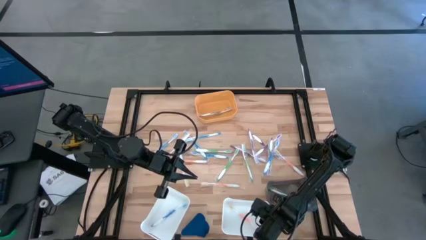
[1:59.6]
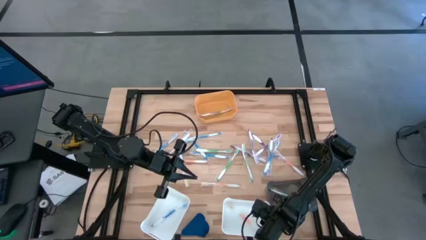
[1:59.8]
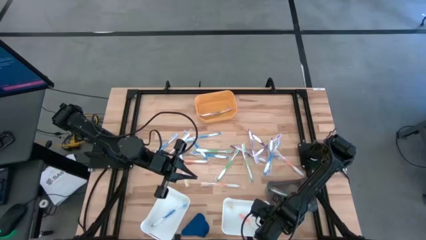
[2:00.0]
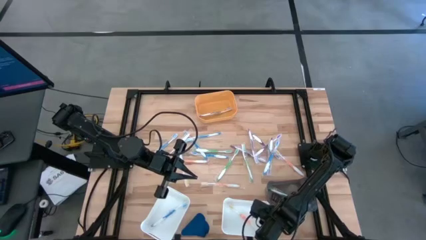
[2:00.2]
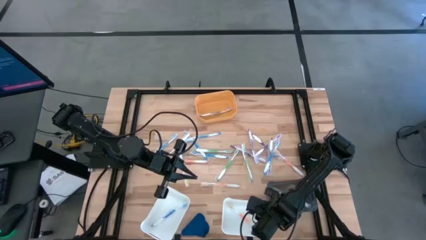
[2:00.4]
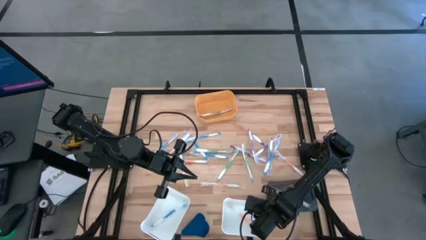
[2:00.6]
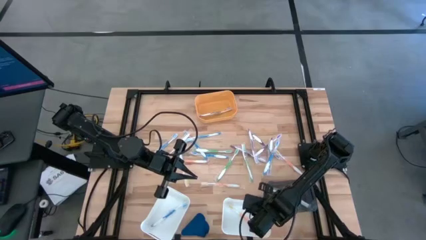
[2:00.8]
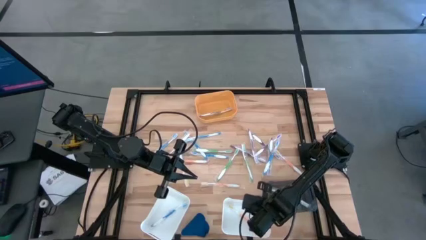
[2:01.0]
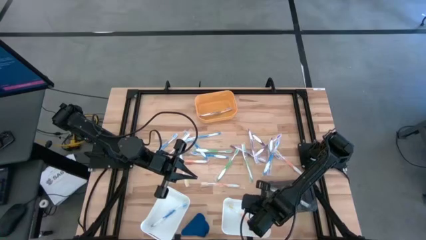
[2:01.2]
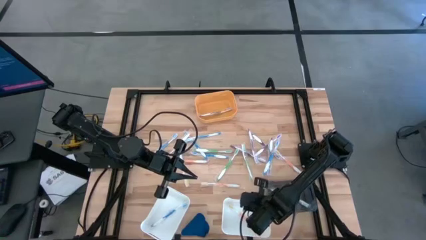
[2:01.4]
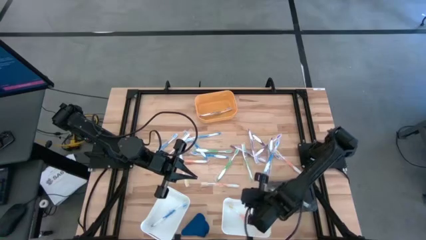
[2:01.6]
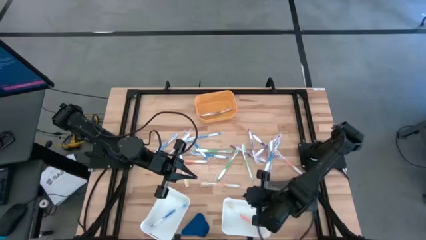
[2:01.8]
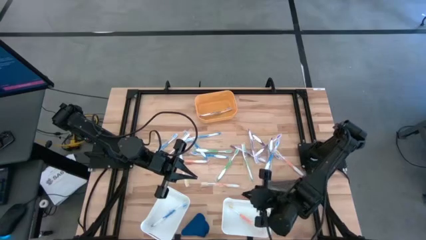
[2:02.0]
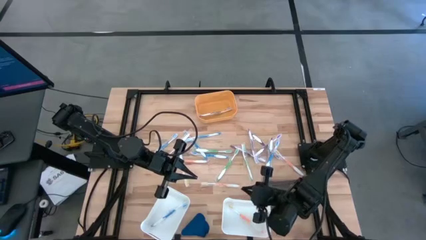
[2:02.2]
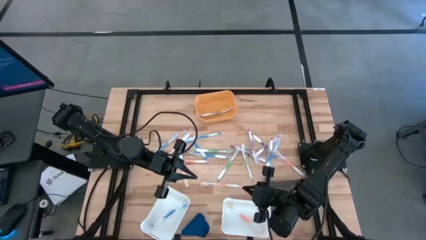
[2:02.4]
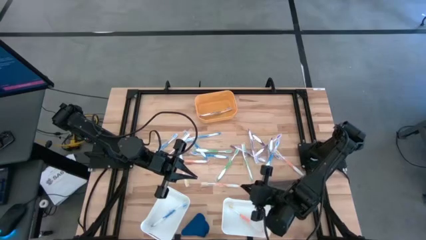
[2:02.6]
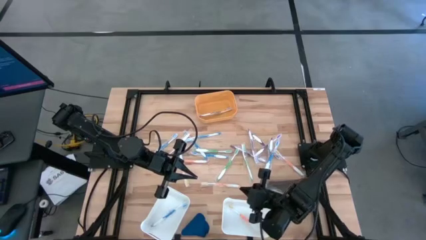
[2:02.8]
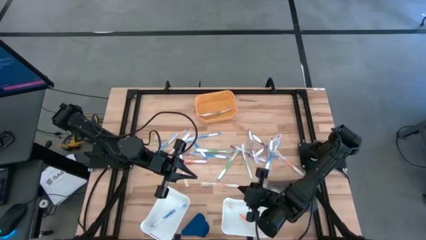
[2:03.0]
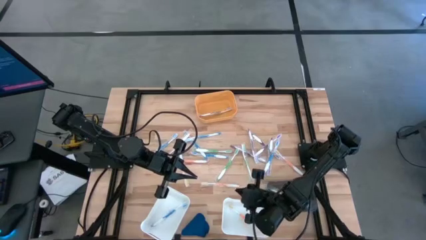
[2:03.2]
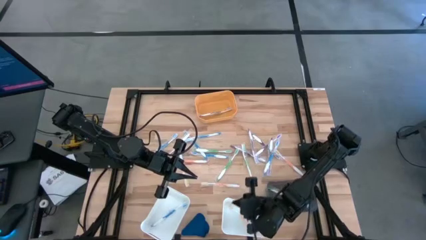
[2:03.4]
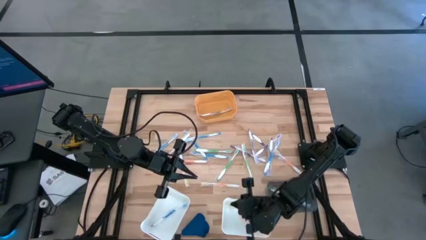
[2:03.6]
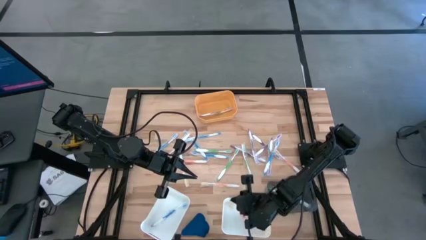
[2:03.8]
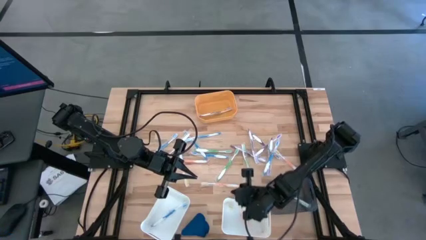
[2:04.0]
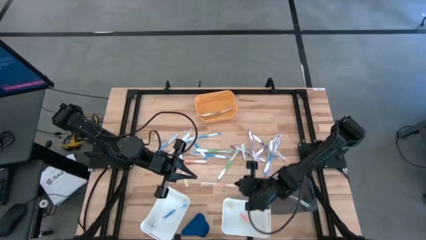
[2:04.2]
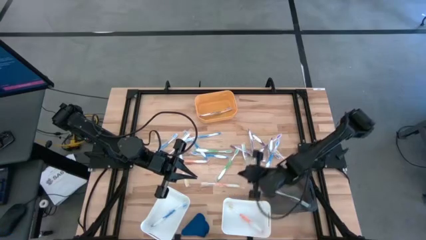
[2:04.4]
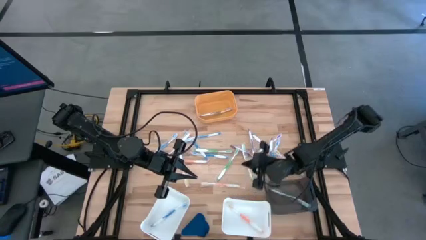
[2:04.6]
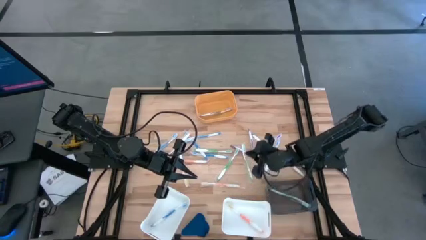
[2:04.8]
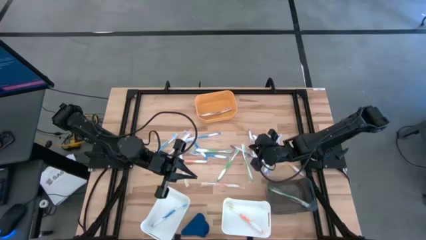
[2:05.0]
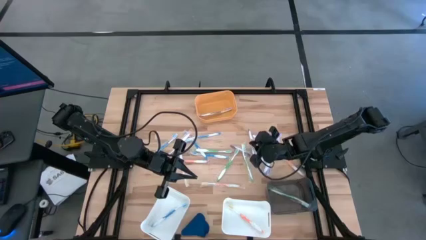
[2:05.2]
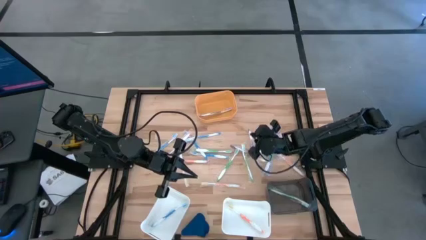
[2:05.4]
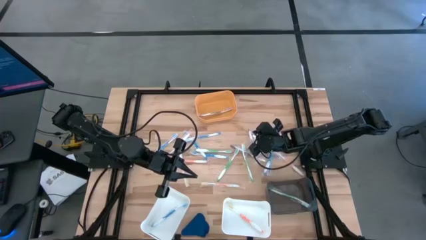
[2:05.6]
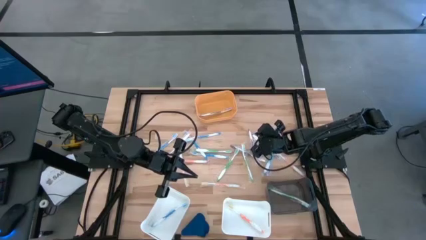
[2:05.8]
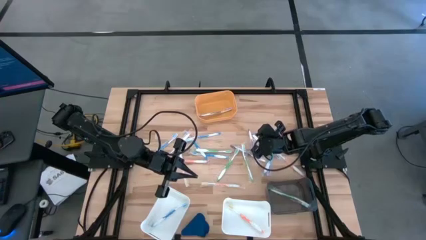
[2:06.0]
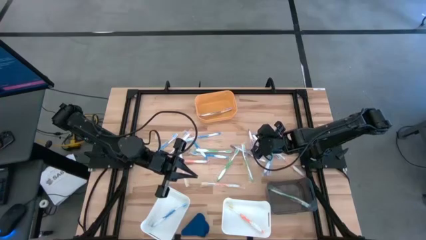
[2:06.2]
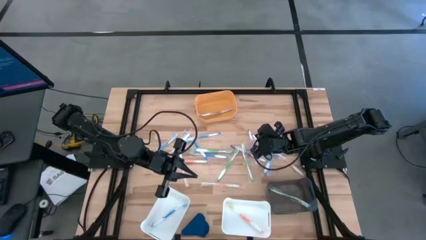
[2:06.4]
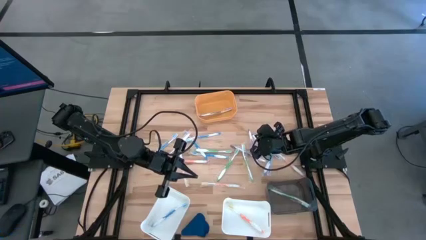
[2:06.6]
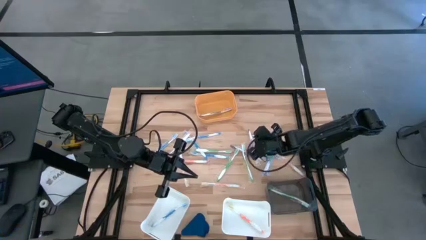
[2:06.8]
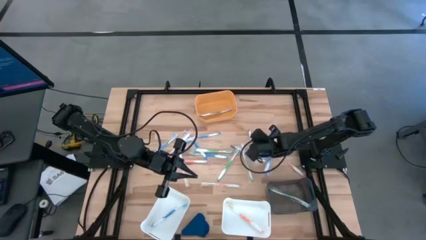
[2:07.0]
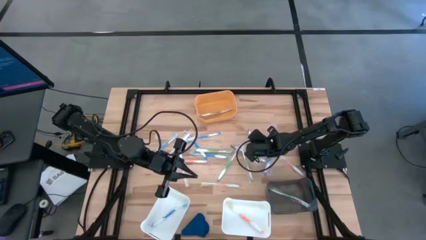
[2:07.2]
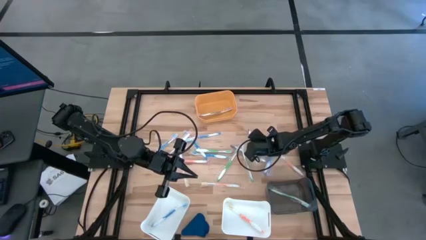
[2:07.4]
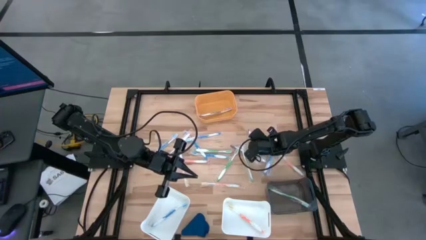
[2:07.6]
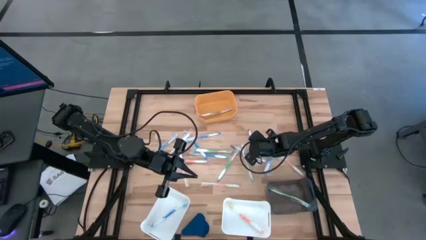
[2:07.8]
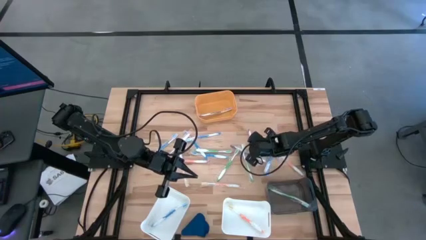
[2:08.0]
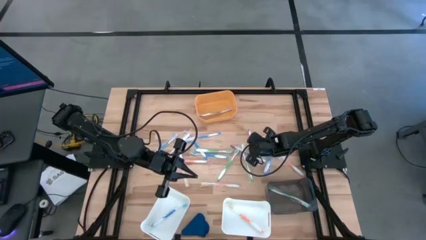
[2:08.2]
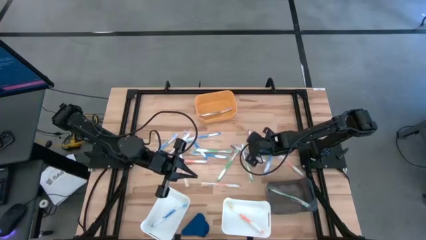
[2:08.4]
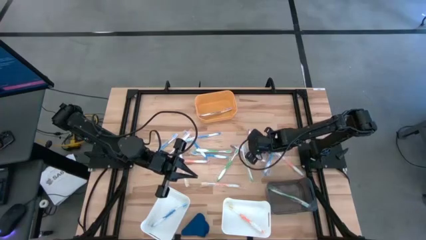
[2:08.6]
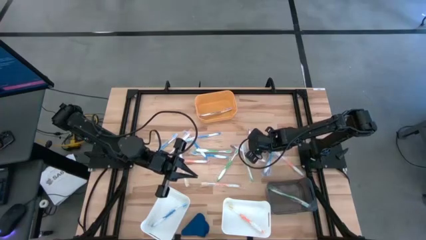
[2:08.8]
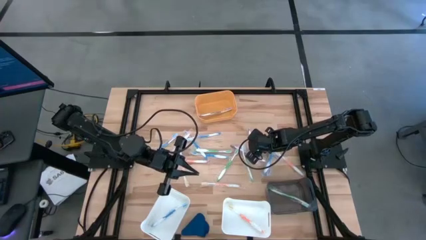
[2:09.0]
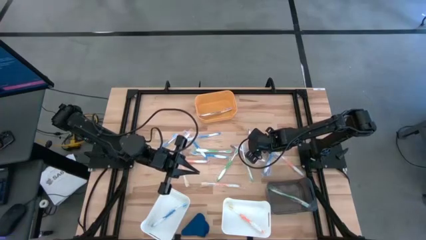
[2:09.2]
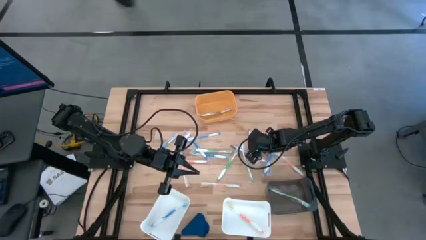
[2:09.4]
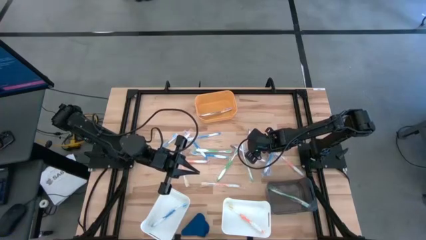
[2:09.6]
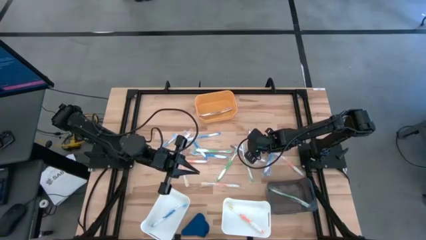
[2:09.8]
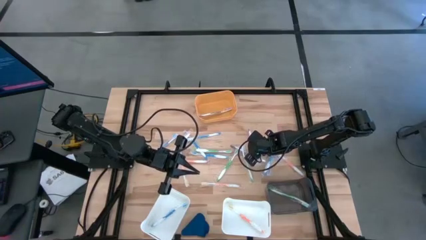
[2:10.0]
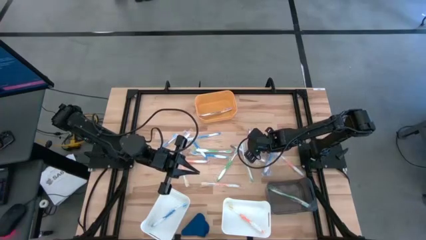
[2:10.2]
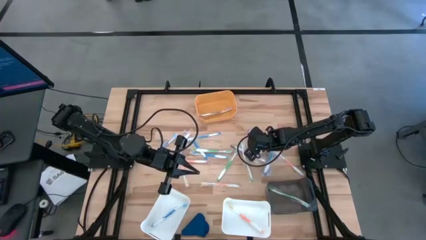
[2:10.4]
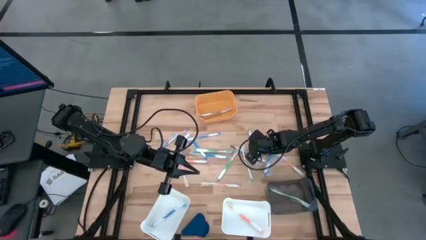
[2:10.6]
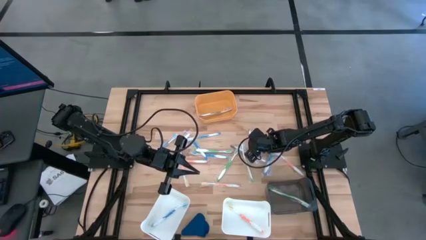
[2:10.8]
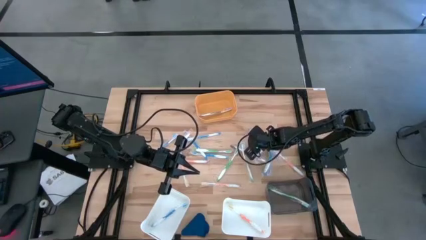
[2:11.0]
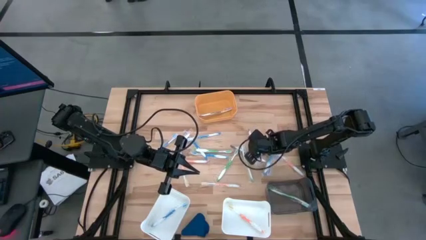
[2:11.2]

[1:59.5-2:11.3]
Task: Pick & Place Toothbrushes
Put the purple toothbrush into the yellow bin

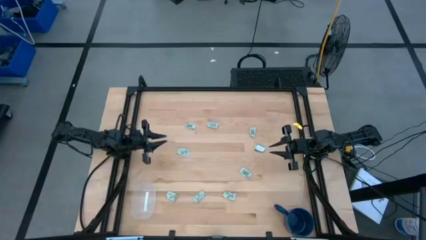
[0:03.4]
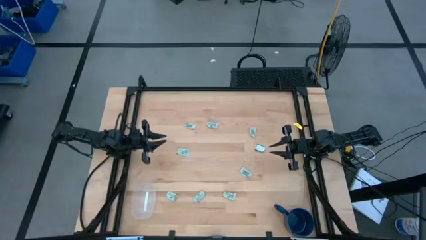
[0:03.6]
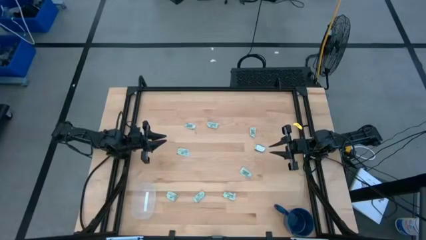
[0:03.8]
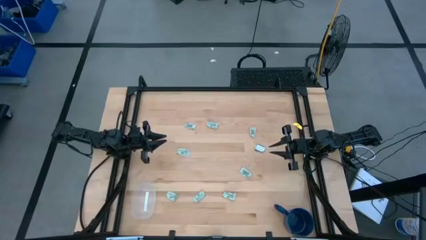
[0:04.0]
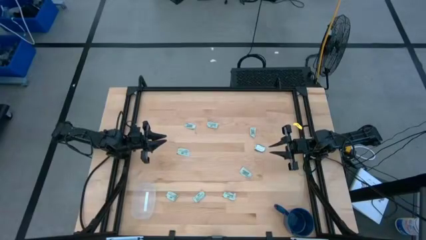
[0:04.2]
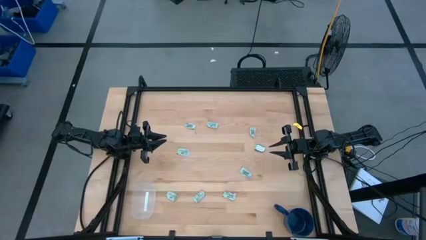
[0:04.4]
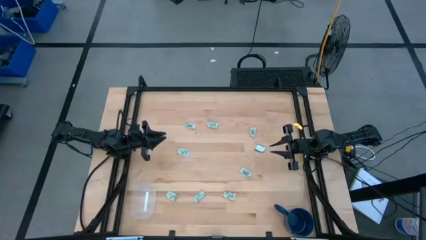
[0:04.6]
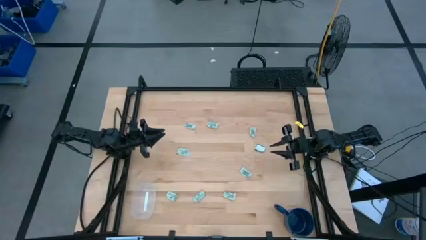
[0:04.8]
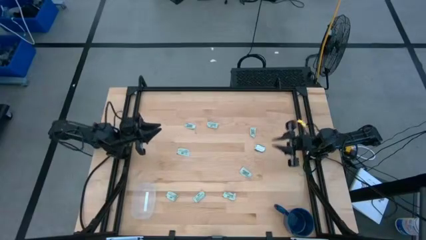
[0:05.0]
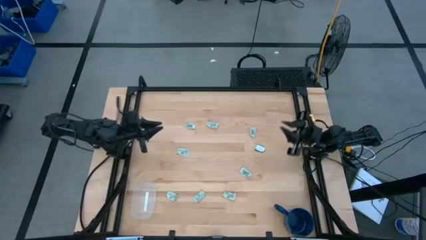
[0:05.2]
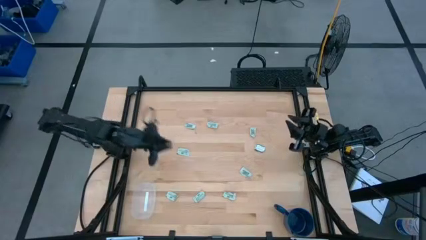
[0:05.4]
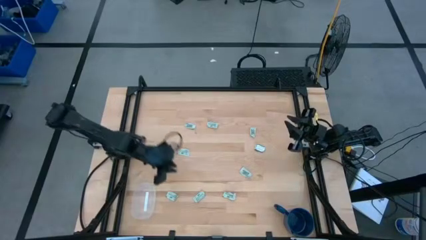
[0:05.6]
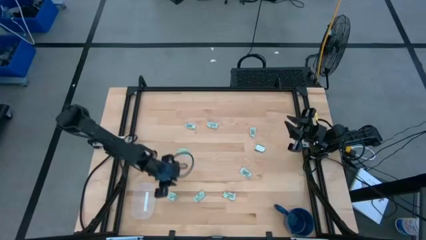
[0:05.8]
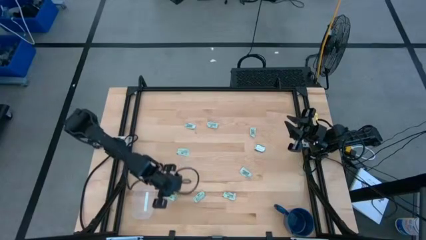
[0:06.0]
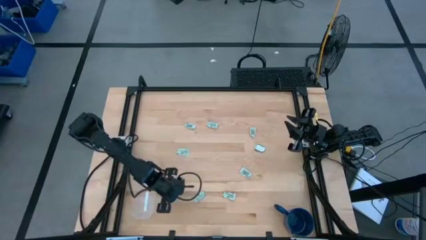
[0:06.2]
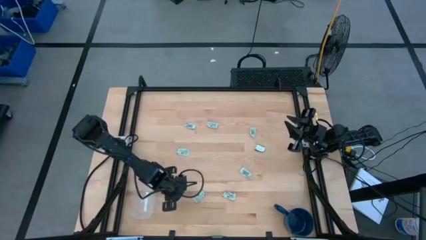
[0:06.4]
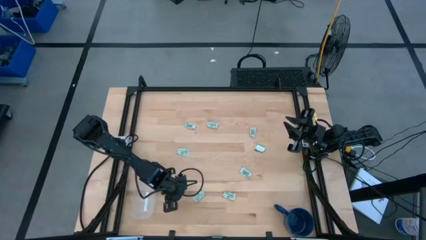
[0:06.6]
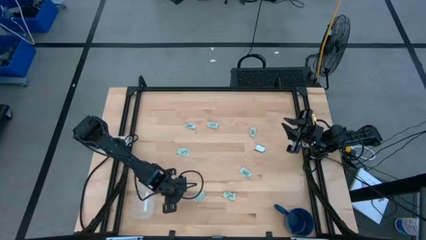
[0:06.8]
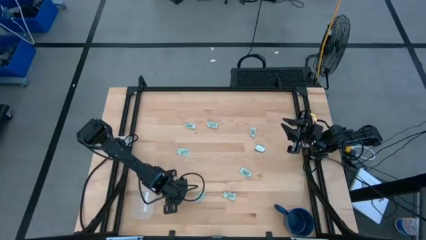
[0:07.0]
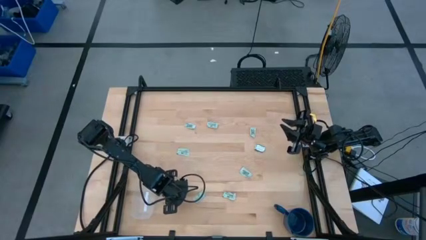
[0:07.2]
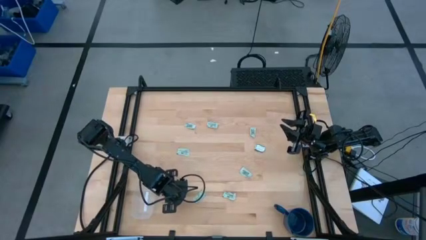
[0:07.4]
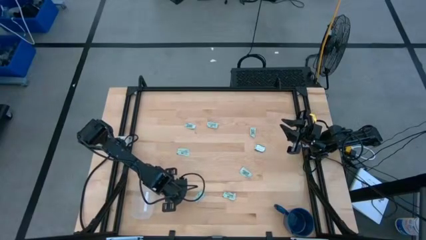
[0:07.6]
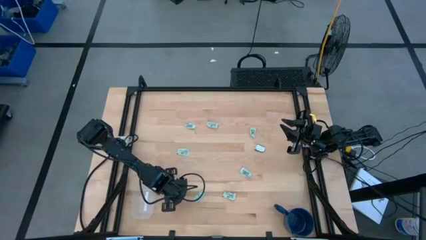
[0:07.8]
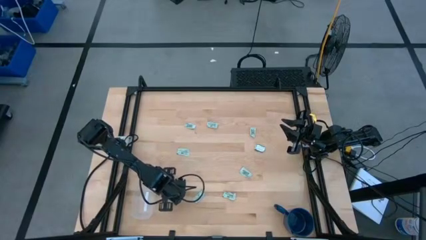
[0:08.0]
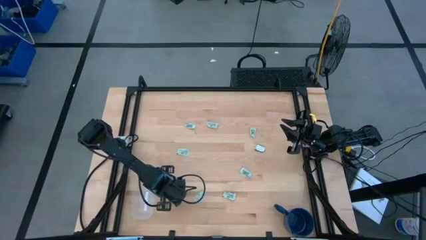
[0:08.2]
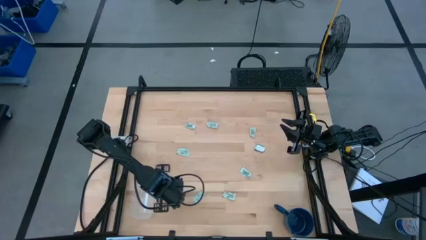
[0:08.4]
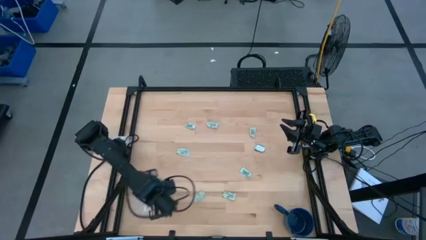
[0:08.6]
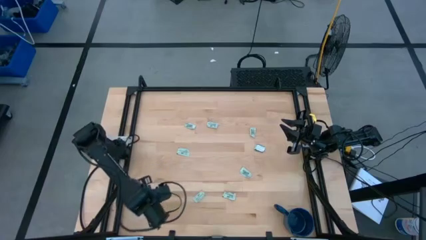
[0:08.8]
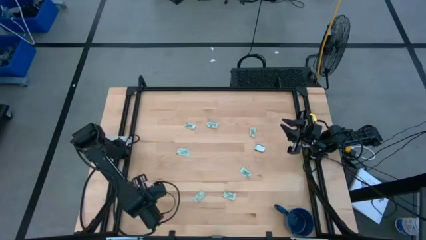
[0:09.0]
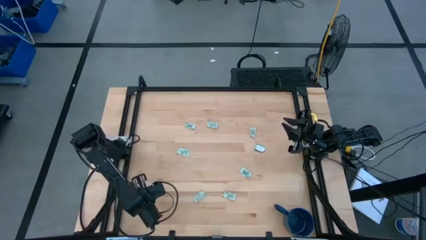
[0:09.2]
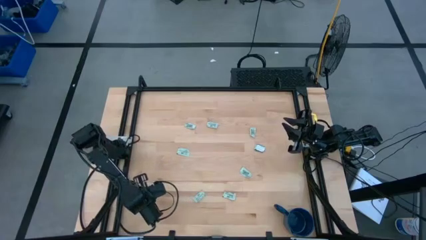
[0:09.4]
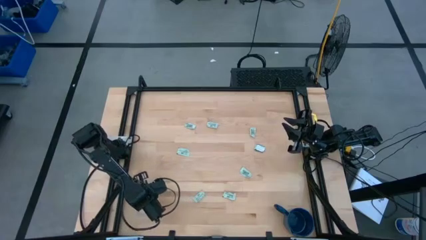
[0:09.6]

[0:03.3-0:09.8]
Task: Pick and place Stevia / Truvia into bins
Put the stevia packet into the transparent bin
